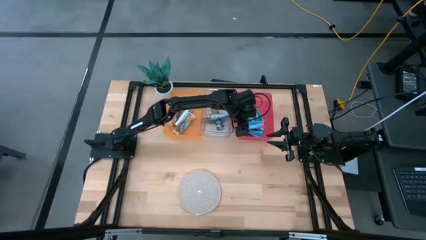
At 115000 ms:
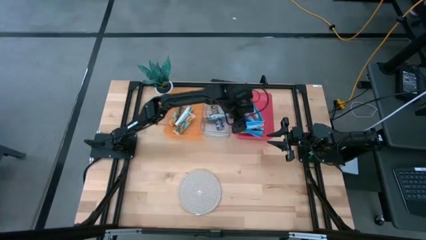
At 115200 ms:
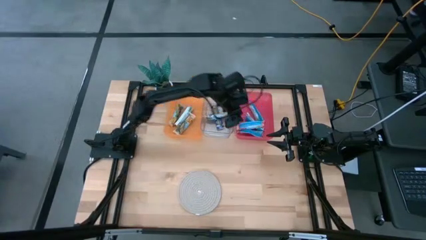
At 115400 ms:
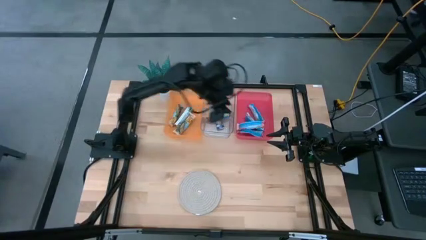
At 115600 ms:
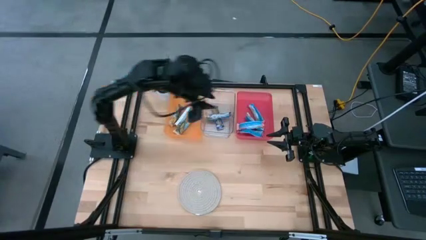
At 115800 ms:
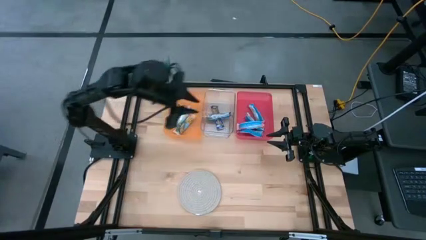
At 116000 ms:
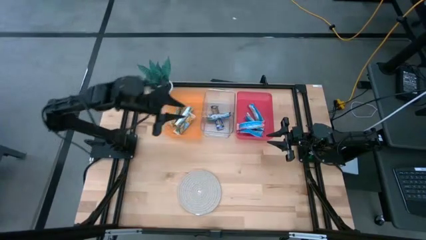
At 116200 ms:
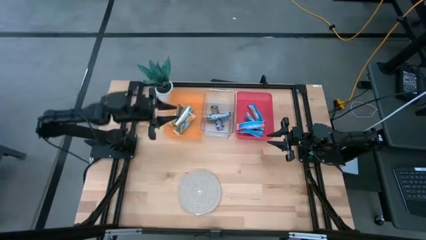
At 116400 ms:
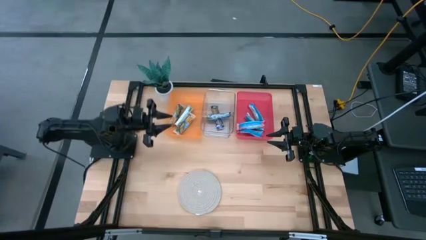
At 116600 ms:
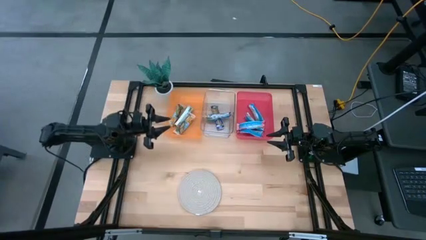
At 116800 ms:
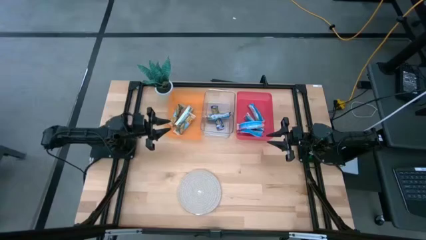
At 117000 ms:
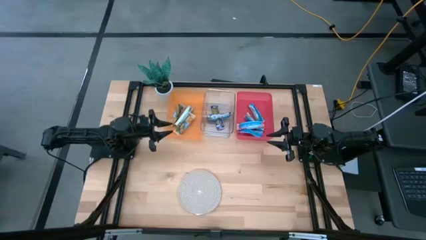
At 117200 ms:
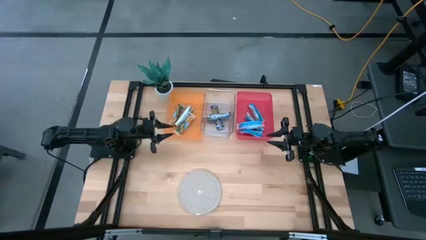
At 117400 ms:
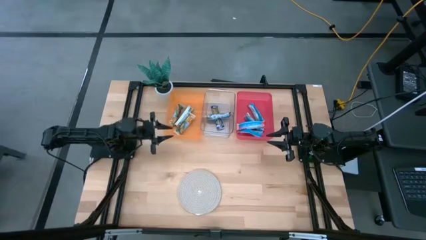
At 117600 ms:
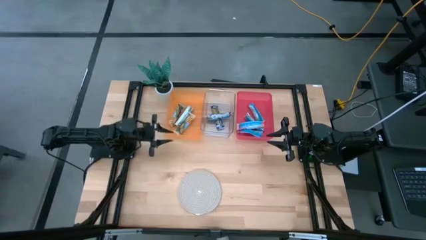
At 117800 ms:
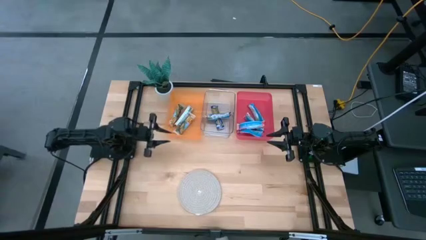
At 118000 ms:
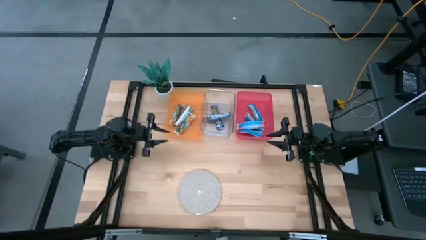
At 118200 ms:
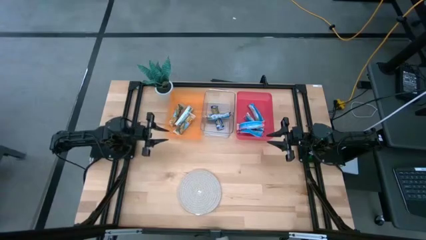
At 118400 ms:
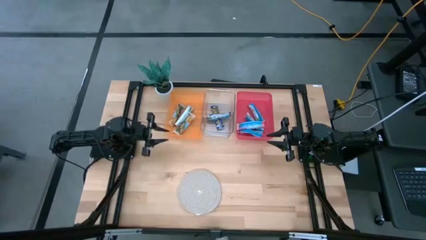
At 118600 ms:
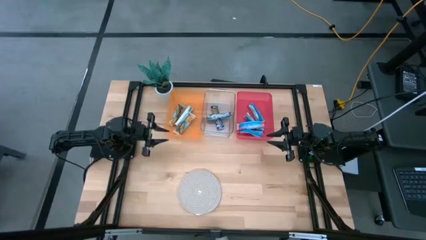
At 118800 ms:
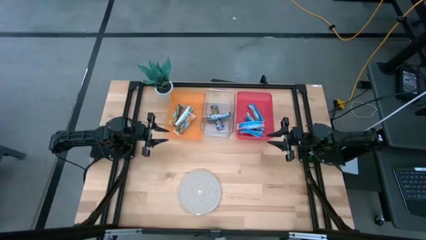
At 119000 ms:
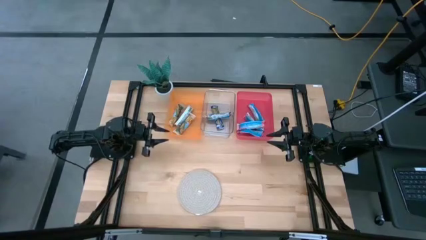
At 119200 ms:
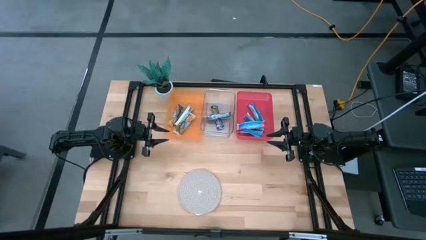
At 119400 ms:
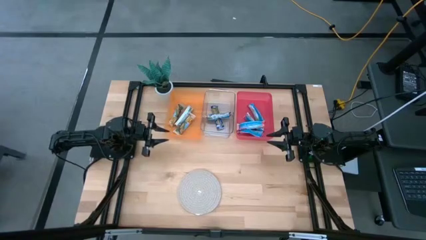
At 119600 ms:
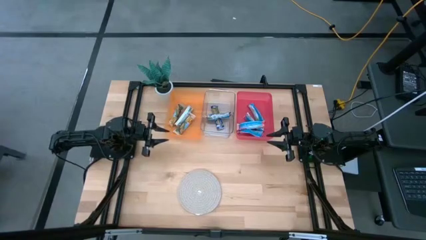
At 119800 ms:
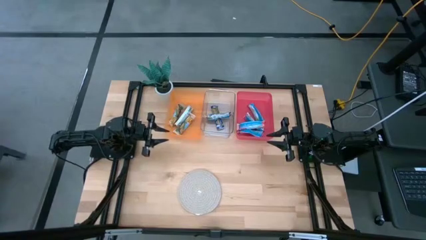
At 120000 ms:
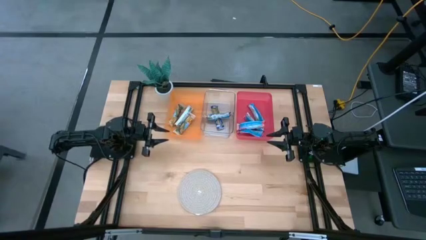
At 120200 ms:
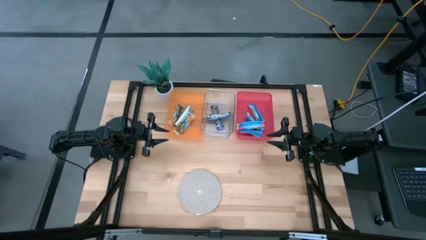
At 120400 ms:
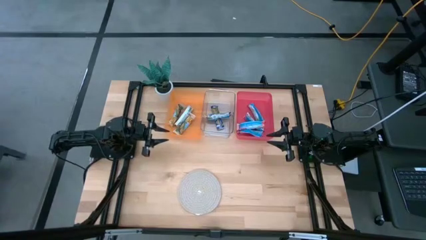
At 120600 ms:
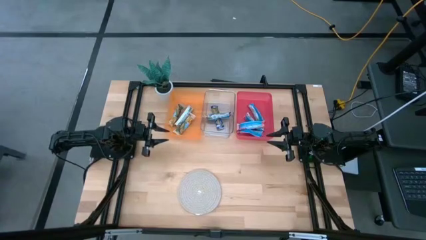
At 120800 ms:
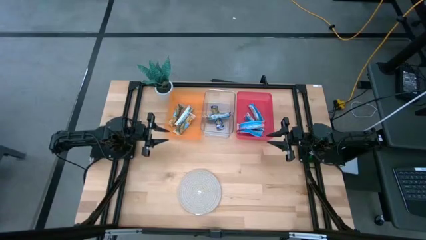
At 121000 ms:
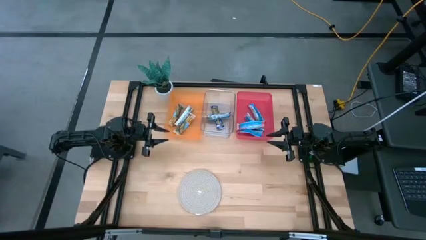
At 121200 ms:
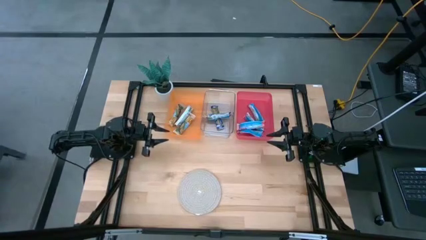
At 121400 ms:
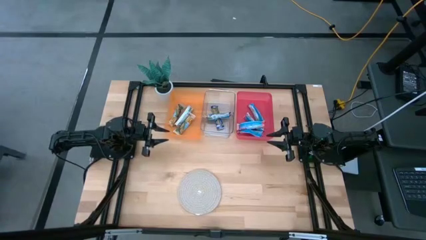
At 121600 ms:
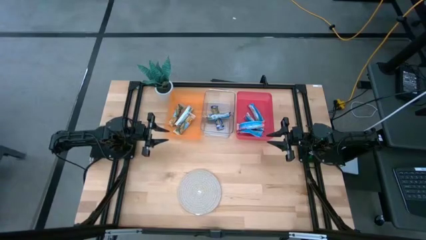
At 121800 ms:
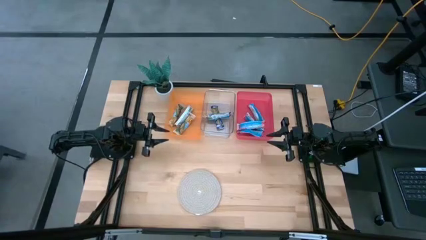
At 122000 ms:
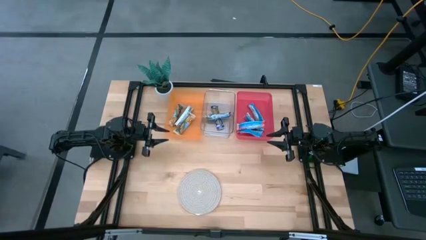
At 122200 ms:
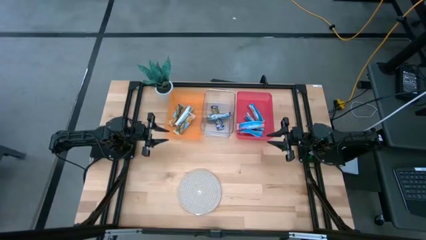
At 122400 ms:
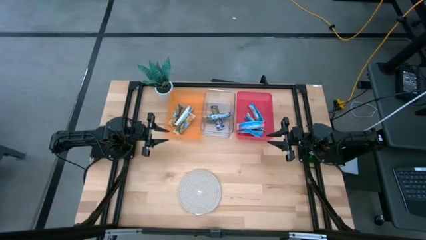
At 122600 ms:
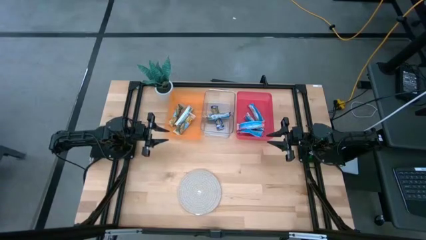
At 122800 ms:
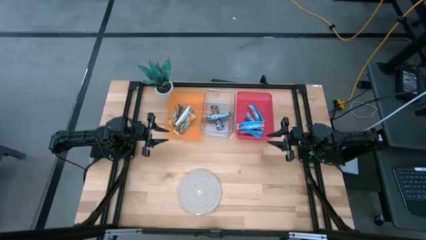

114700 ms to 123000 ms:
Task: Pick and place Granola Bars by type
Return to Home Position

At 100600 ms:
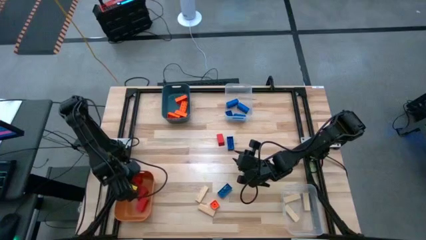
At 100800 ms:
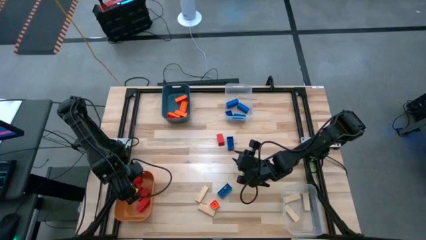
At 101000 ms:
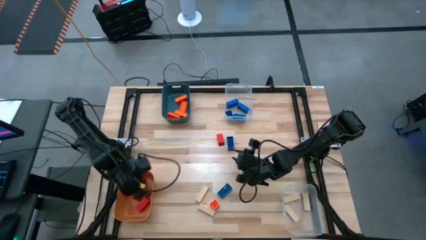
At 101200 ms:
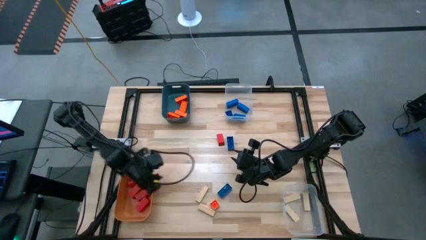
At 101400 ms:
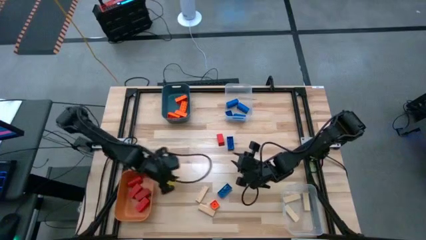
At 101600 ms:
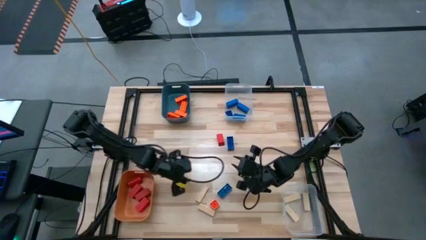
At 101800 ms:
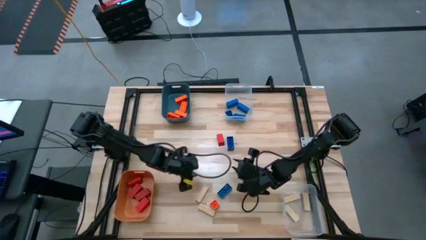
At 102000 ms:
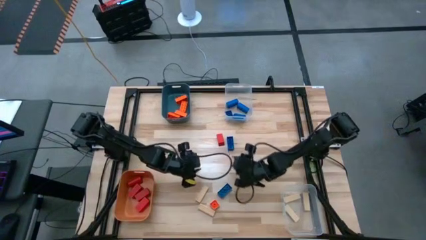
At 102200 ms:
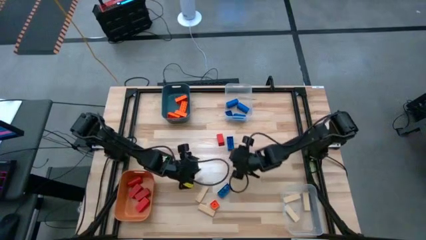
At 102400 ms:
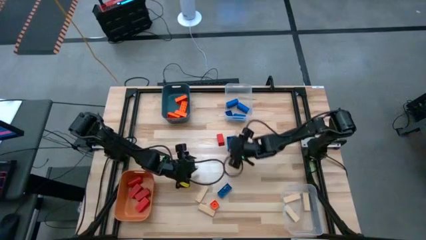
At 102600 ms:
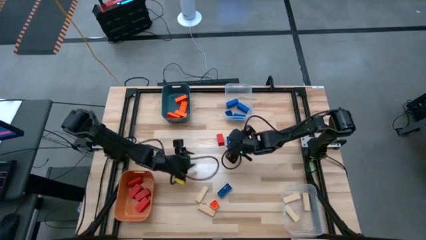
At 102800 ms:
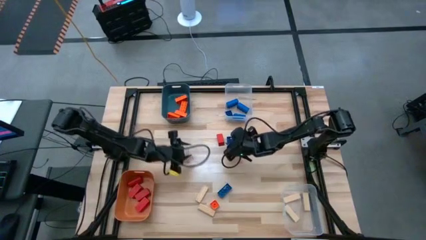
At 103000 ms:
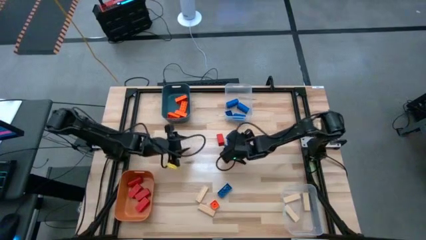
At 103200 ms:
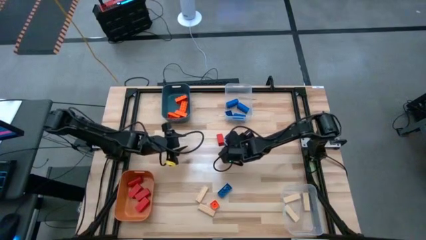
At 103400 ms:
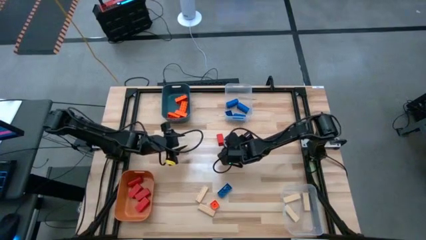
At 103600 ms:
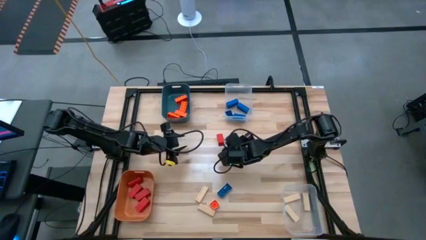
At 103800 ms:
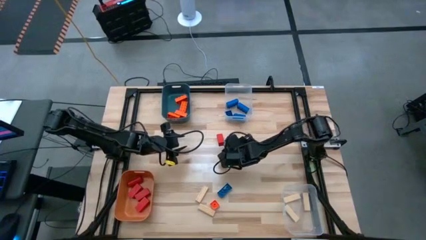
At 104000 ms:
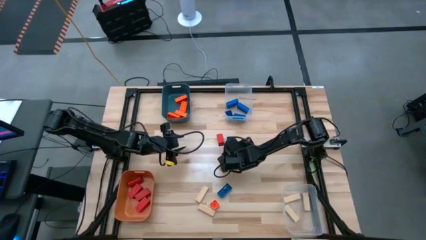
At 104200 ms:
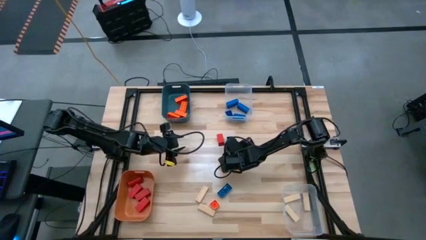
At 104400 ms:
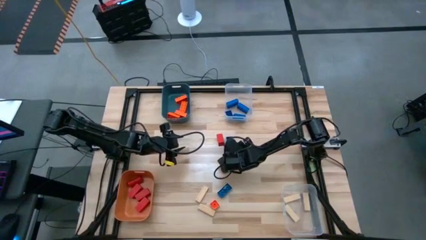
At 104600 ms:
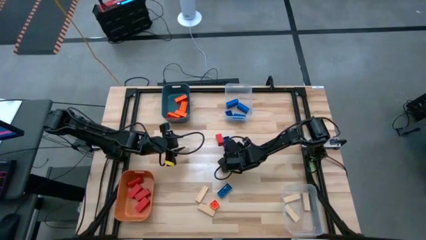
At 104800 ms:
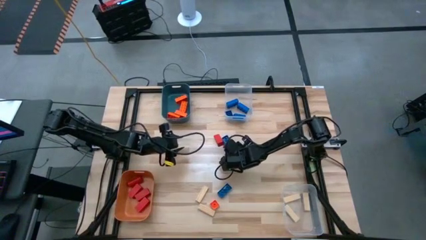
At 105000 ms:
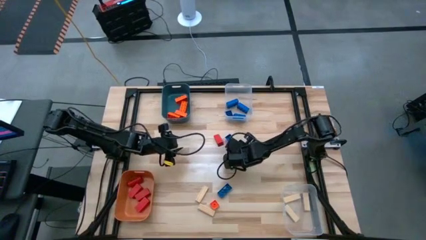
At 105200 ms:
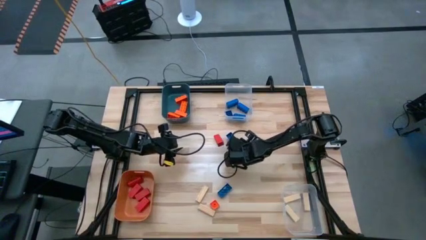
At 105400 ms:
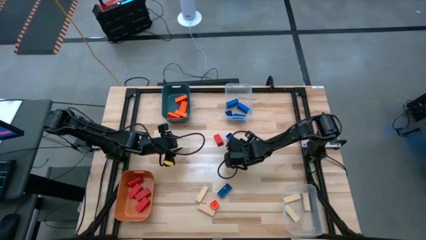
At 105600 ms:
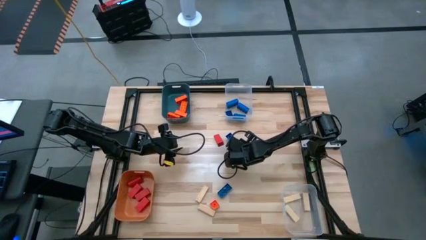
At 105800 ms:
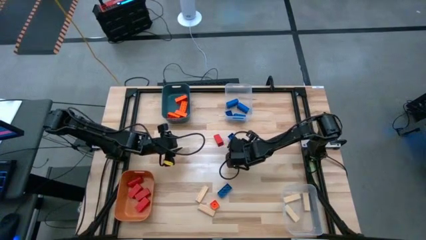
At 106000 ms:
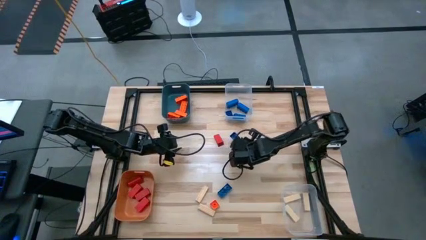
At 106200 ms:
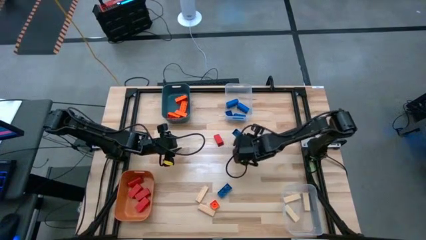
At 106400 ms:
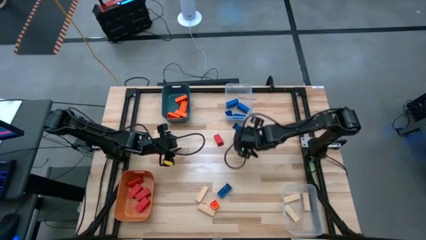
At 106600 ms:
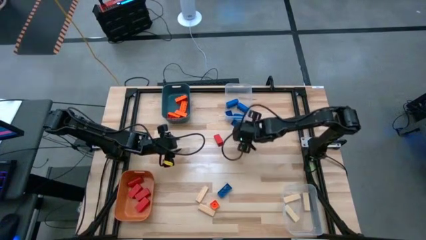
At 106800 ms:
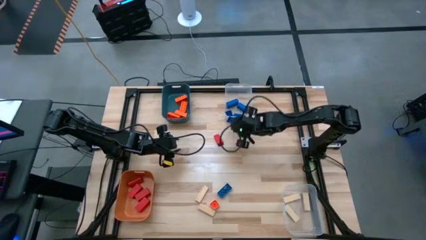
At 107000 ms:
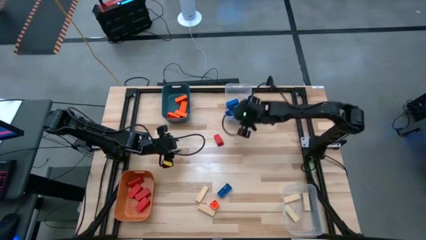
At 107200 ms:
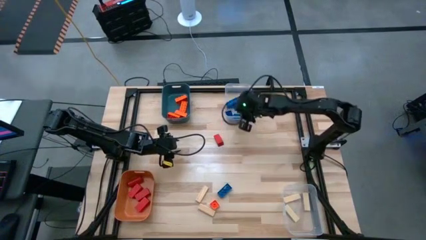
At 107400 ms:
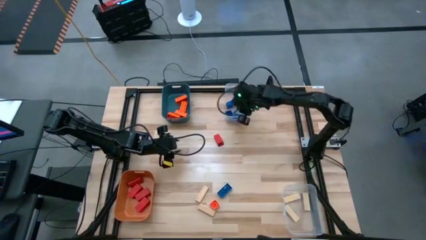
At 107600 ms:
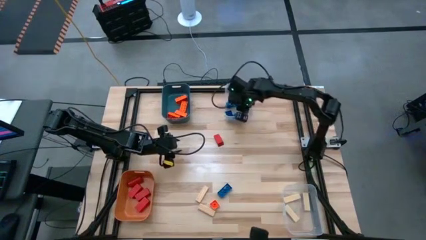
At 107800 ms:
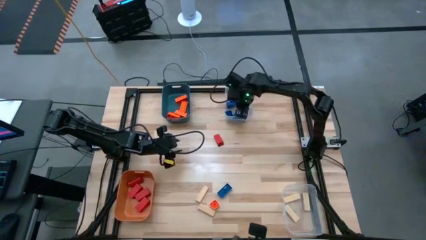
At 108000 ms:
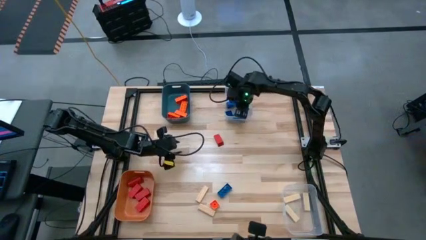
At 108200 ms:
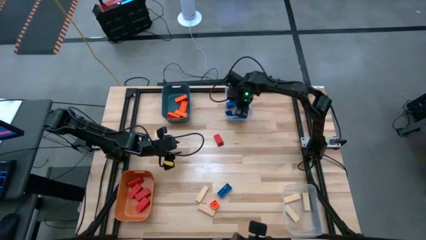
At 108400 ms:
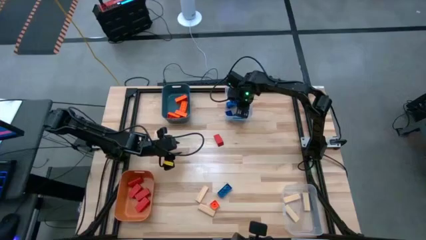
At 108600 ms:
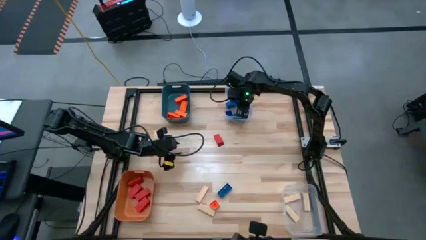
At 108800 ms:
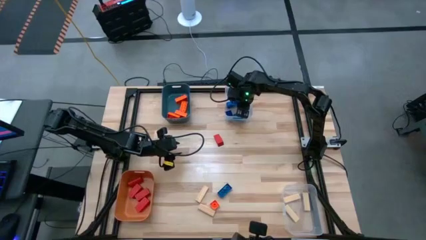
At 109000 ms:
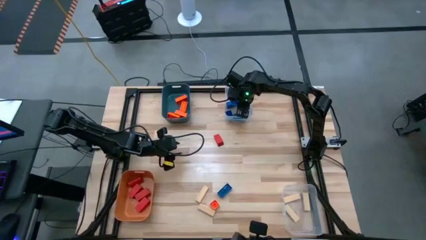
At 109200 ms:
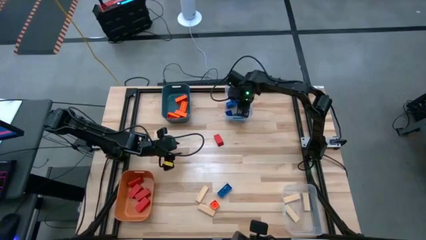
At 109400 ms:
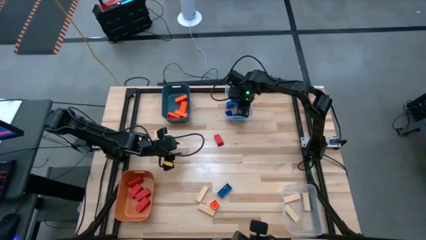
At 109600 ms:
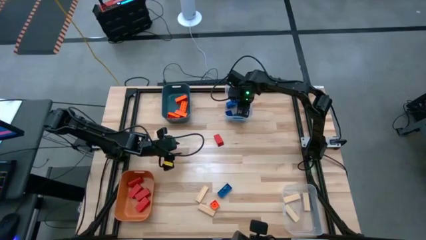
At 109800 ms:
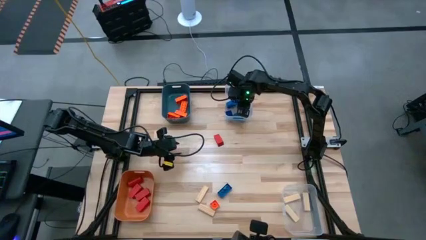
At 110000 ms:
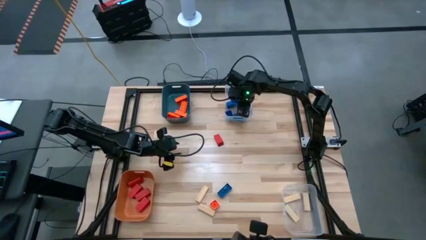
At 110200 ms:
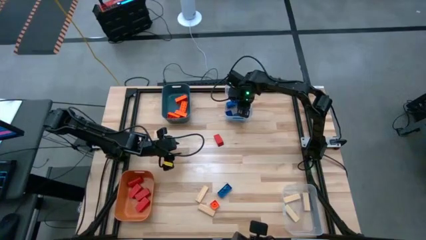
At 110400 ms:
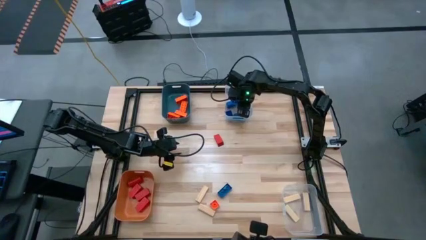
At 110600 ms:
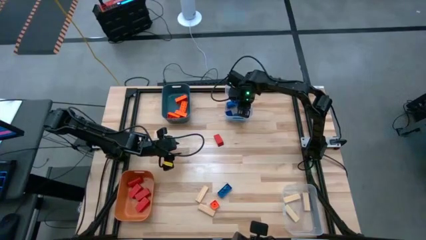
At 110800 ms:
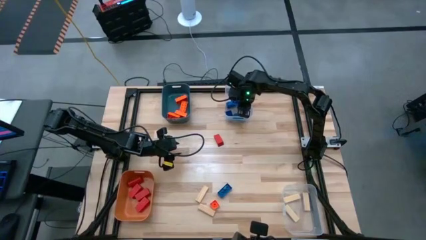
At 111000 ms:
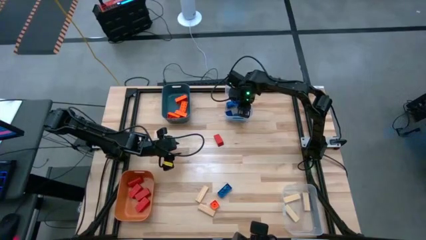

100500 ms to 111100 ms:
Task: Sort blocks
Put the blue game piece into the top transparent bin
